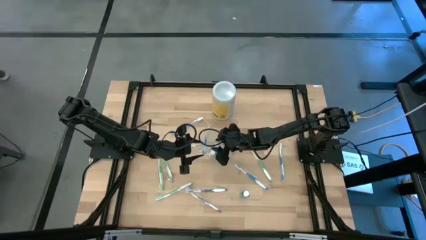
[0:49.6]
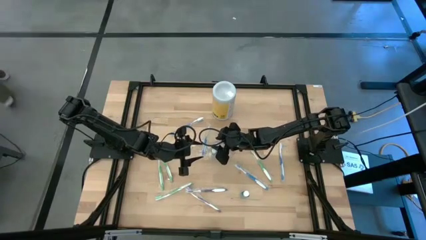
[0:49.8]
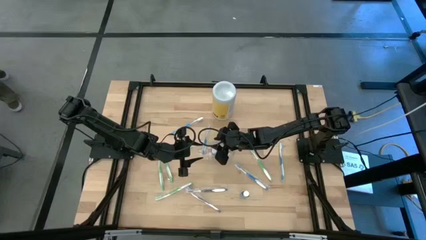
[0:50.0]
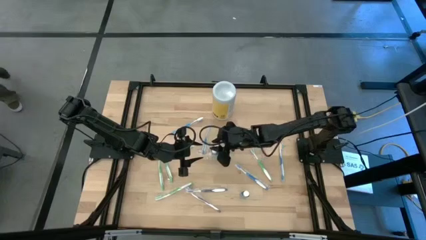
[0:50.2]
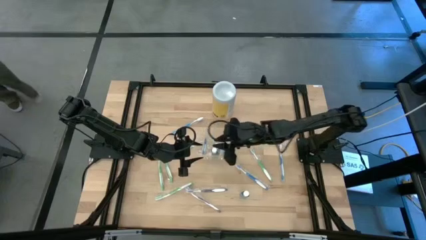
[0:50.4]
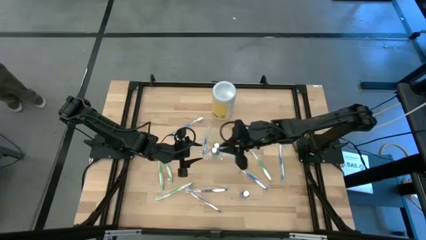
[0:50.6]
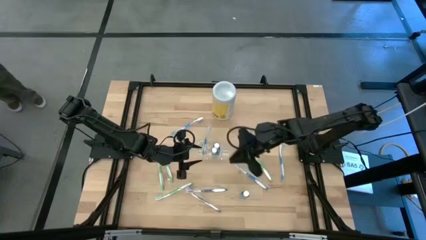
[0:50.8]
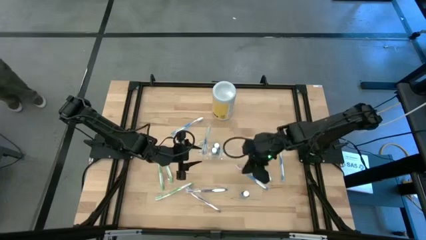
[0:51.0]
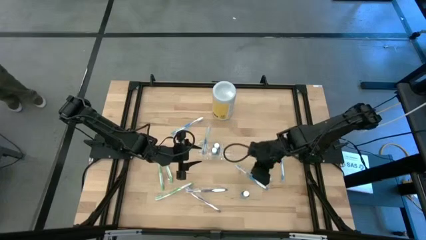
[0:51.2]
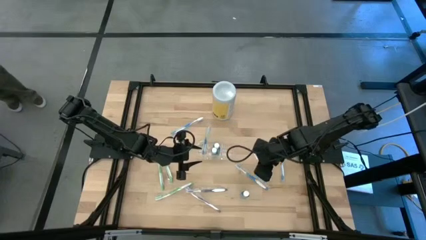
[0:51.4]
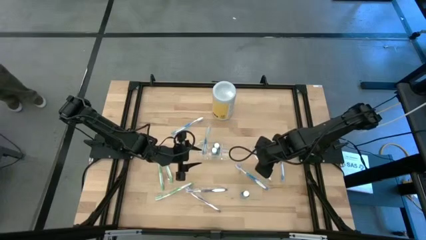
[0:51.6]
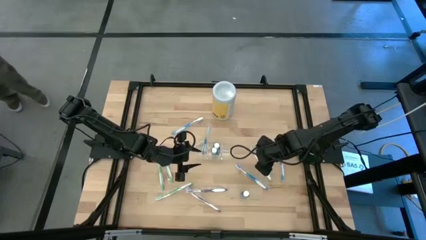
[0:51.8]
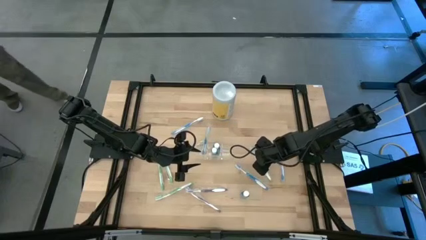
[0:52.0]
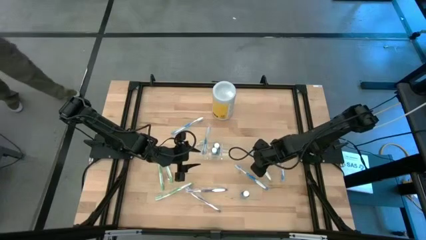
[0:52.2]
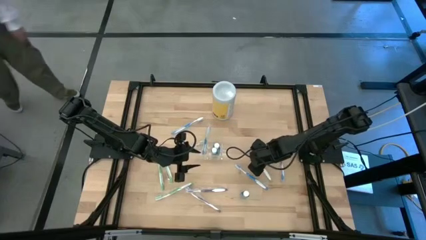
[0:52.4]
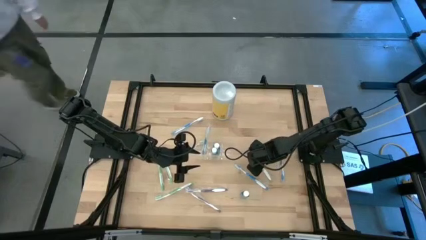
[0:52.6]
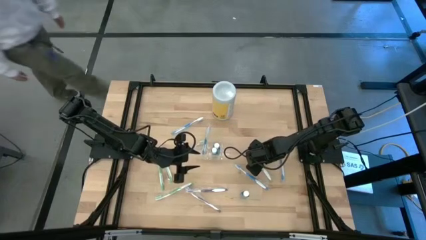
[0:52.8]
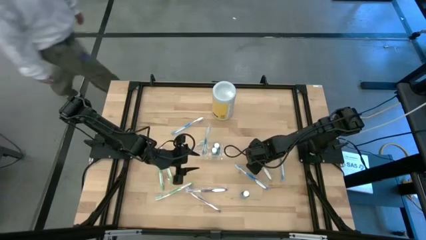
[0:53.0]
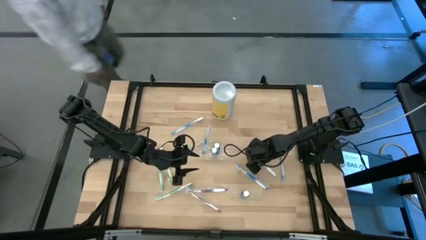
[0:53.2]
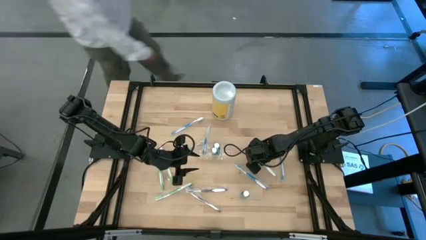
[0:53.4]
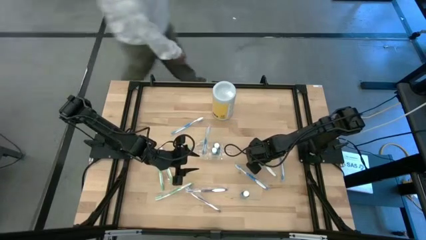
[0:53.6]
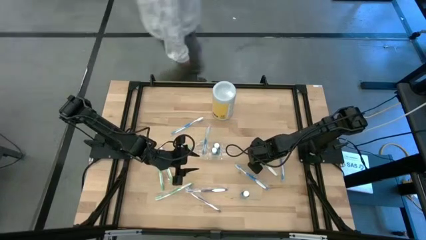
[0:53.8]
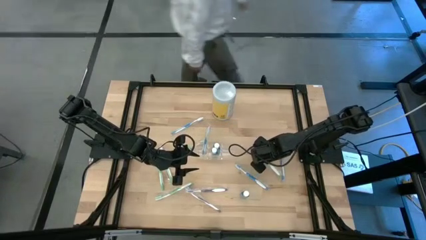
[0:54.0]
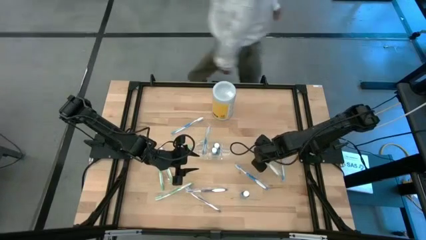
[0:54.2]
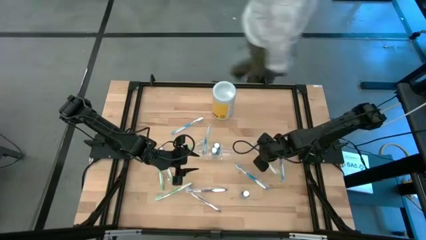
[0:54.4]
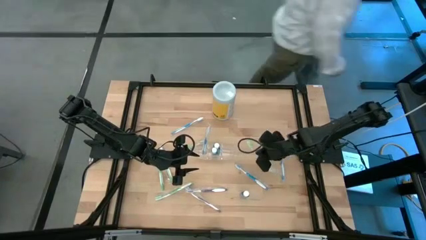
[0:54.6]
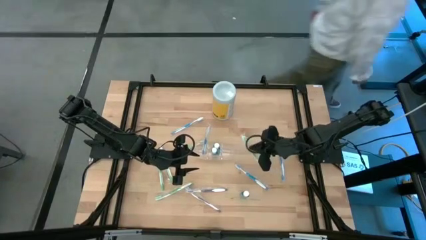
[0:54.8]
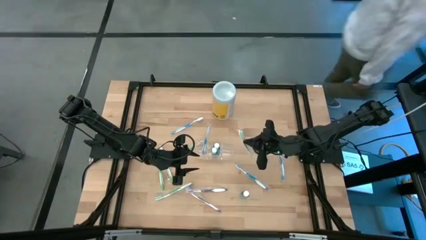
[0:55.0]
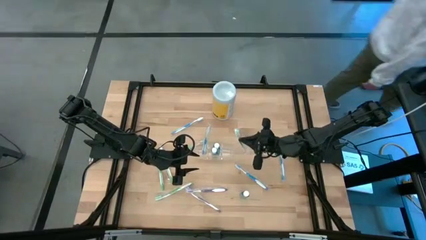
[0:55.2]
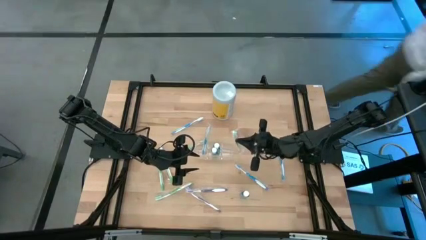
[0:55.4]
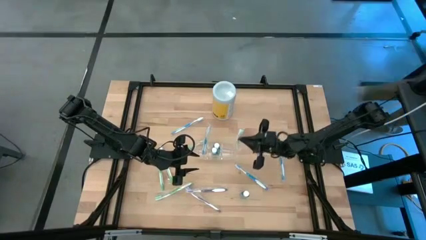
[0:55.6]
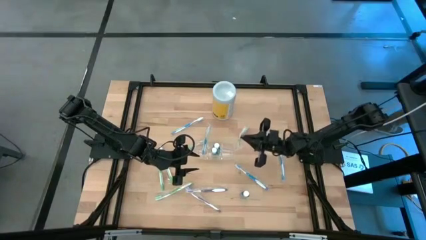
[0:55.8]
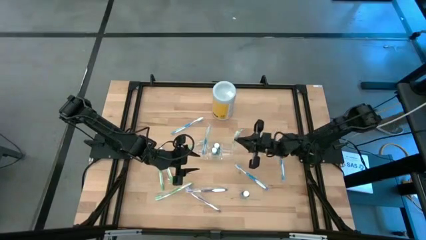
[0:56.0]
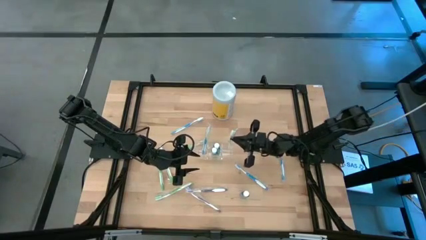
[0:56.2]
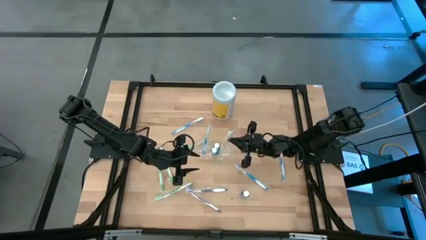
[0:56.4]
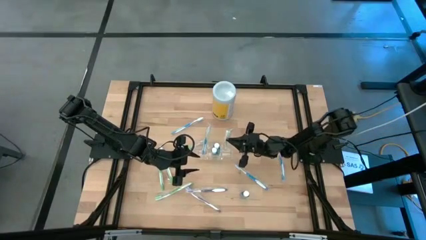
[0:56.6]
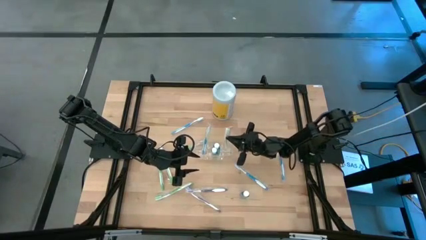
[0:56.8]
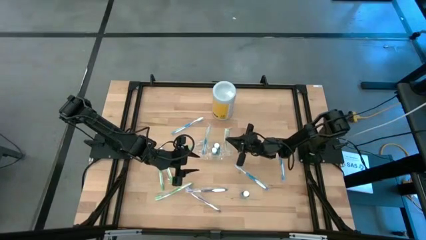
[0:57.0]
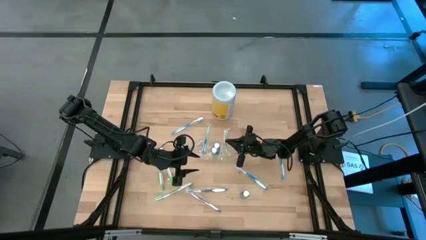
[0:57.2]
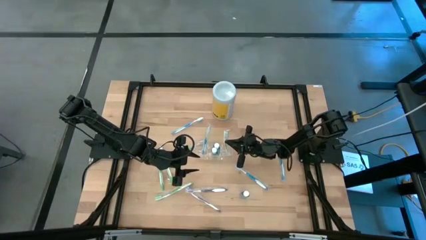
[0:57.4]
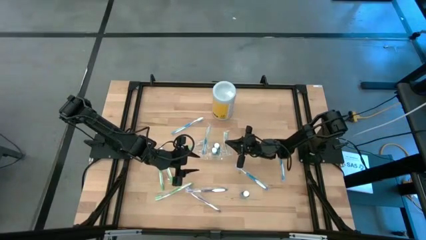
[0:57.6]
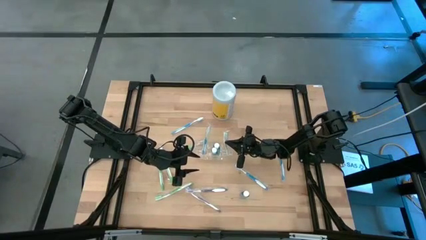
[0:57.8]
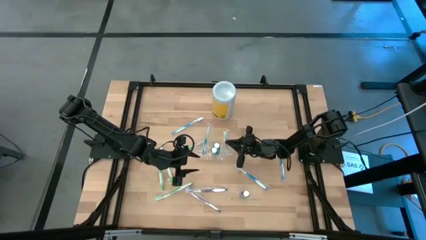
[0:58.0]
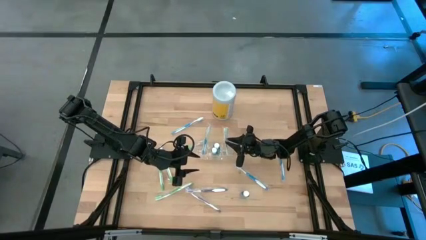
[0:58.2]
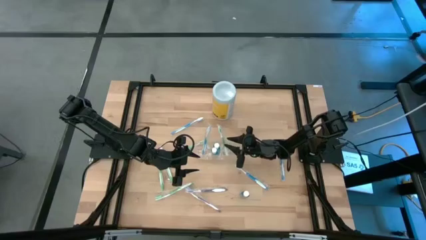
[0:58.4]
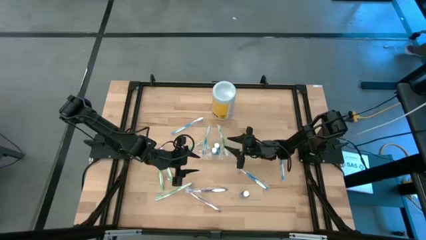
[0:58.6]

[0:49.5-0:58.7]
Task: Pick & Place toothbrushing station
Put the green toothbrush into the transparent organizer
